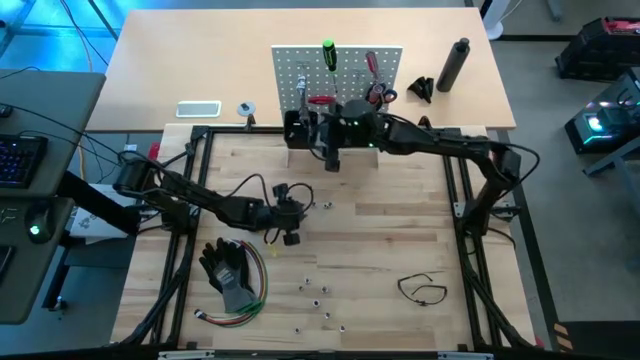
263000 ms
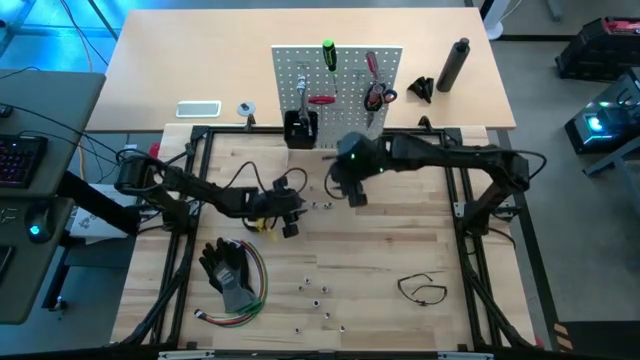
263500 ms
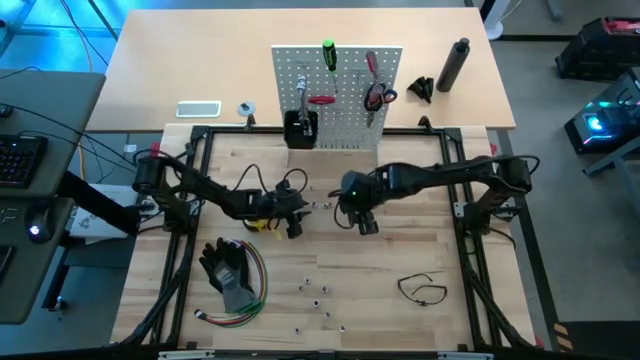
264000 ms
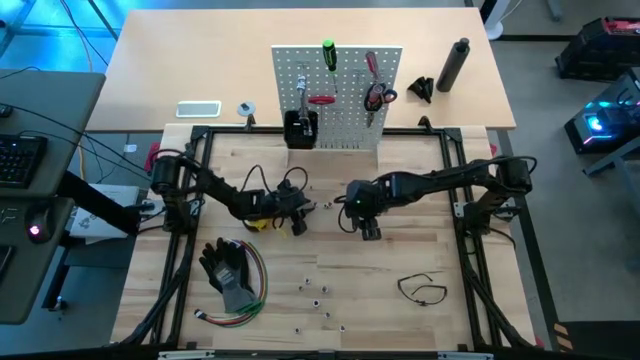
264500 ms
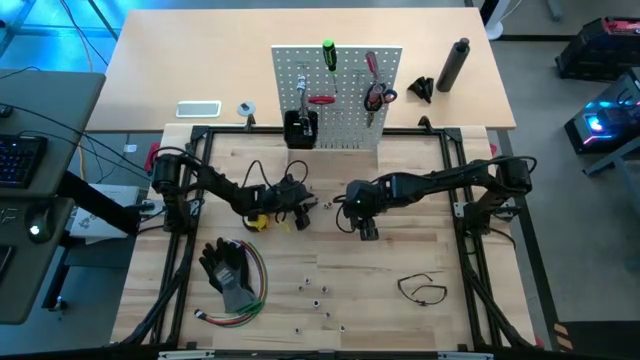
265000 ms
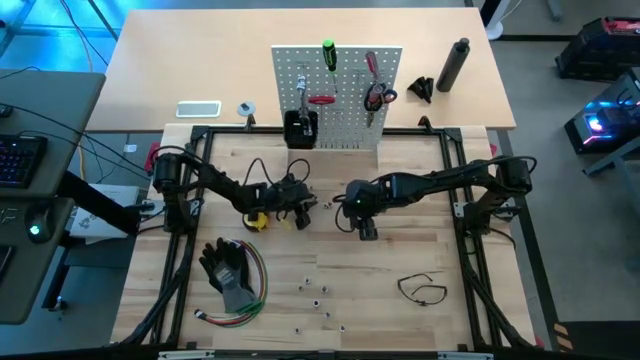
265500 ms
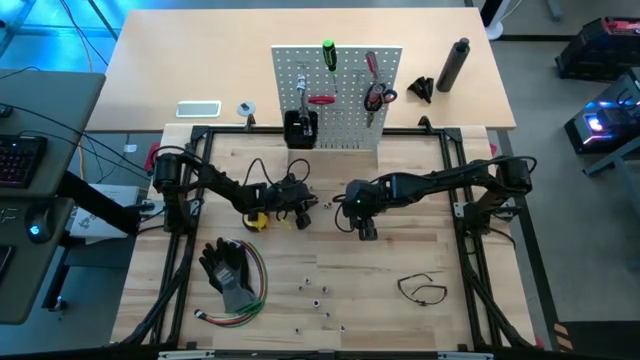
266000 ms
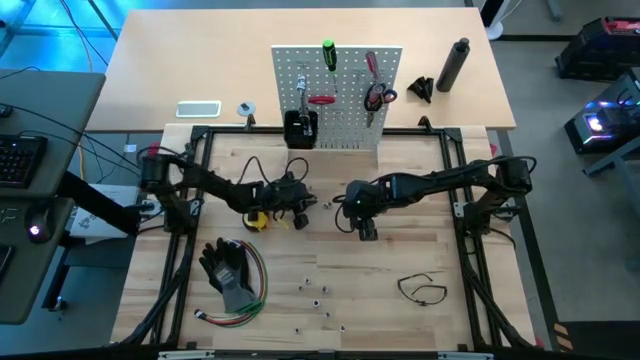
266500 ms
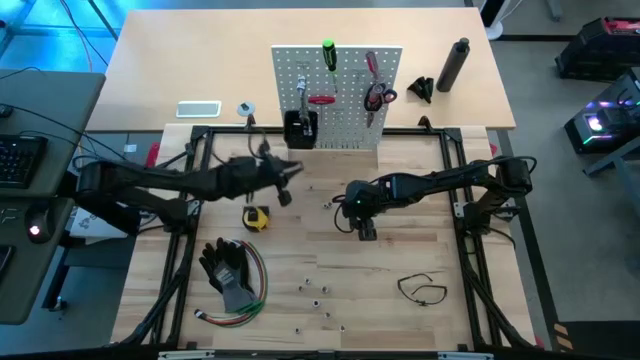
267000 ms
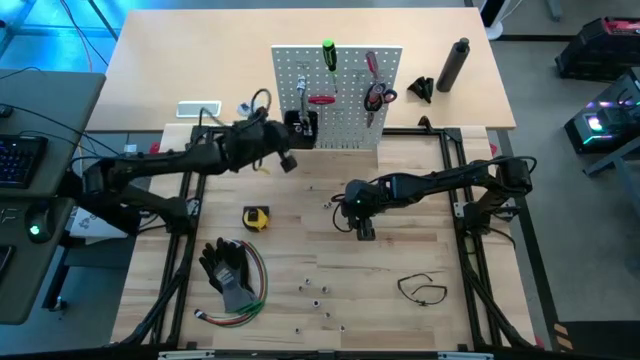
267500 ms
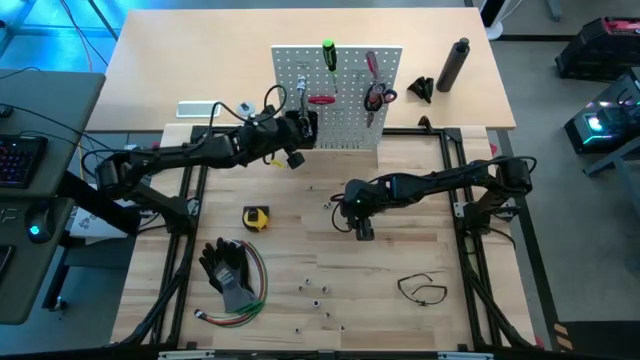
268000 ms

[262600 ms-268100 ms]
Task: Hang tools onto peg board
Put the silver socket into the black bin on the white peg board

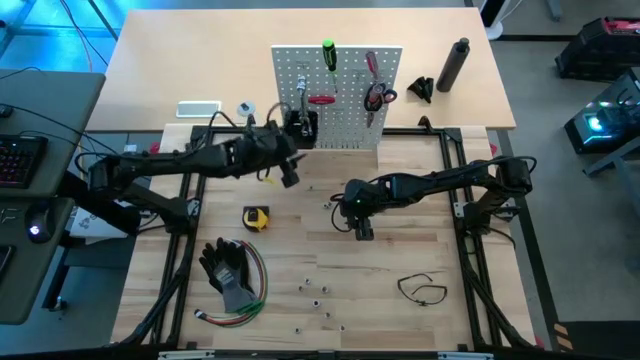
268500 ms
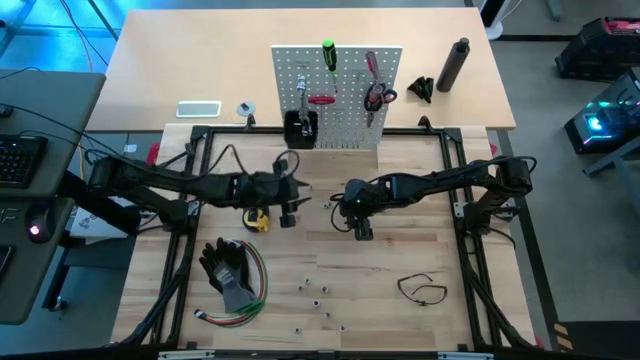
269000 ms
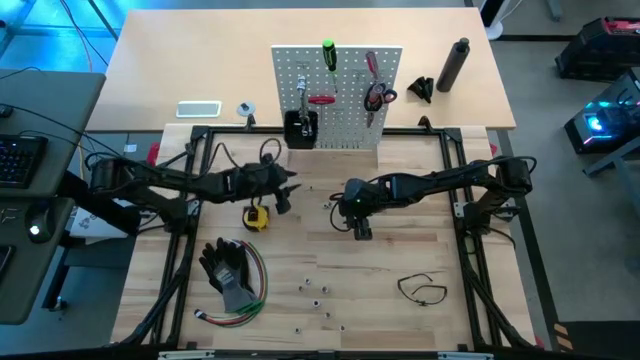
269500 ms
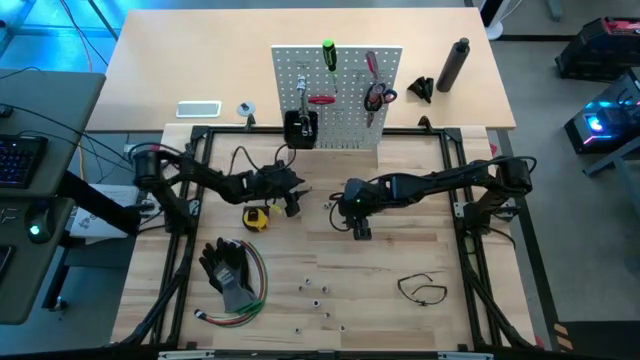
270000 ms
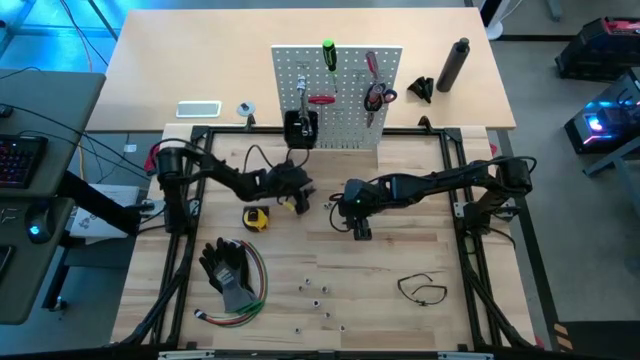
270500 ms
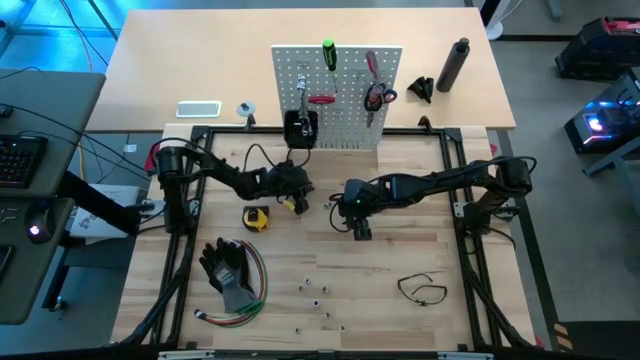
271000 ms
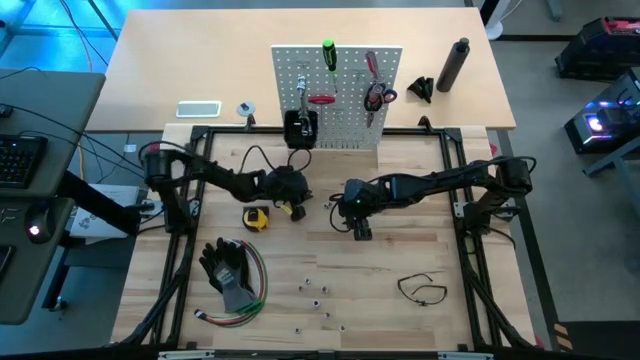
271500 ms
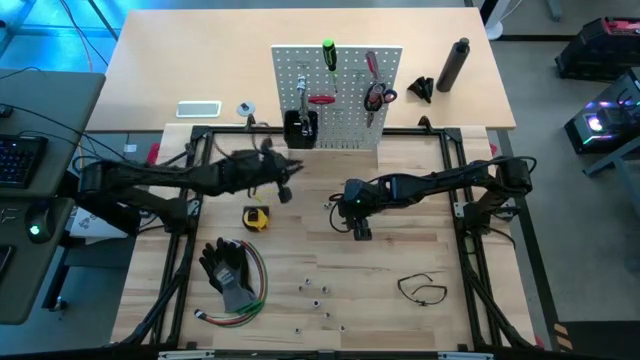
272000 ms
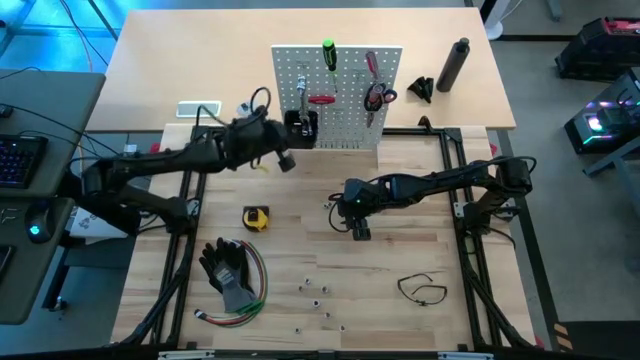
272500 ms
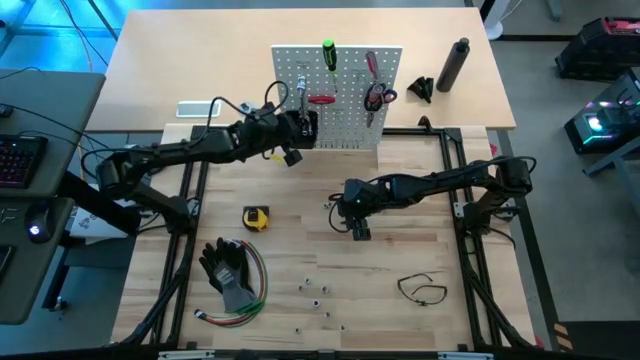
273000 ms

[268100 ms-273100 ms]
Put the silver socket into the black bin on the white peg board

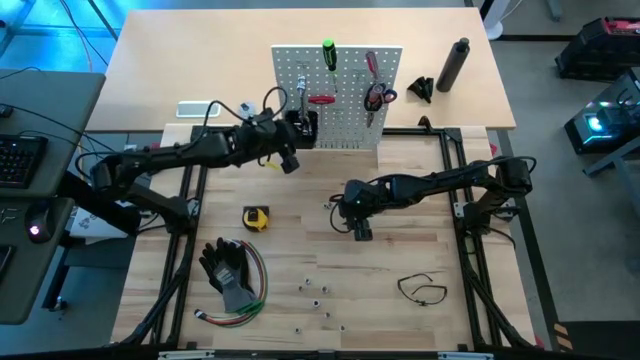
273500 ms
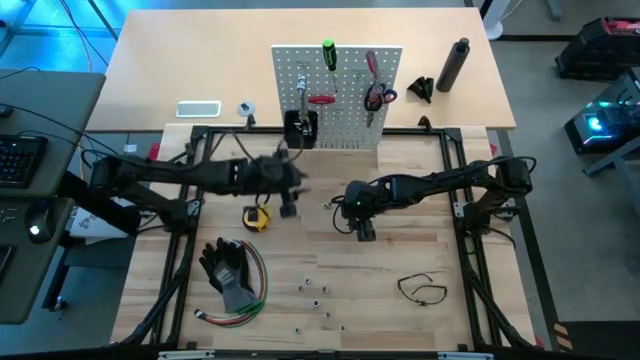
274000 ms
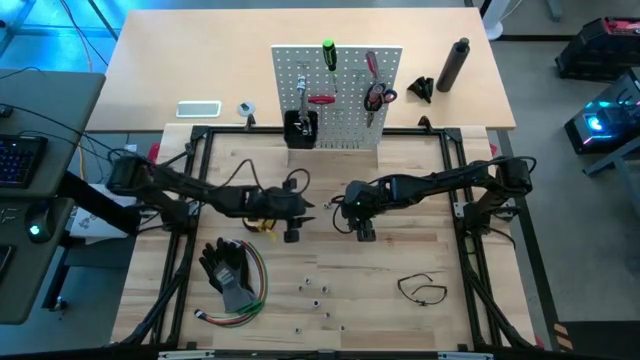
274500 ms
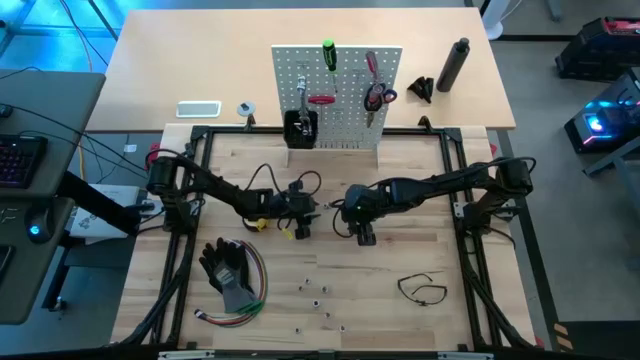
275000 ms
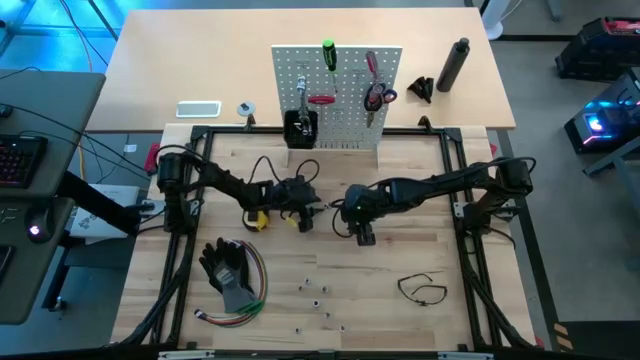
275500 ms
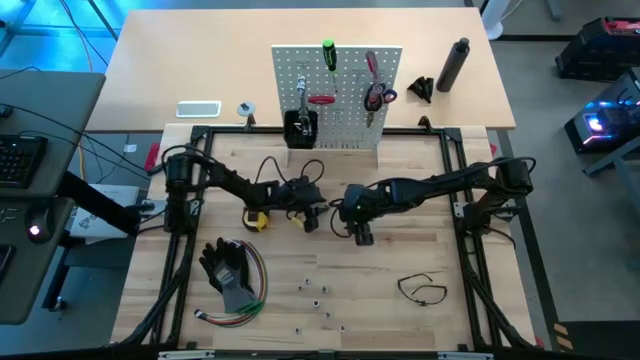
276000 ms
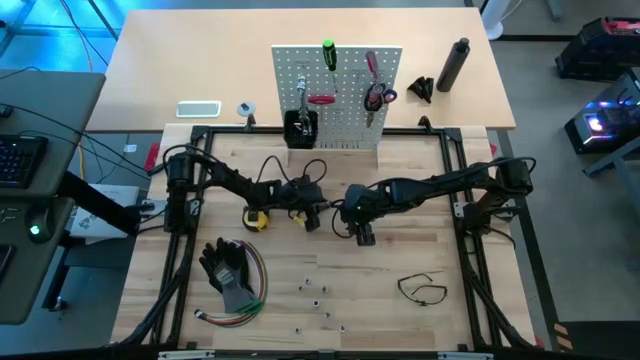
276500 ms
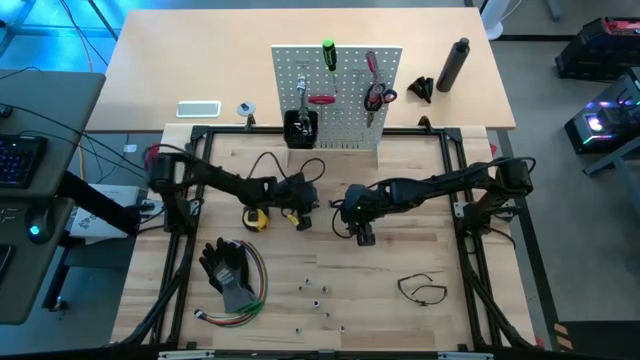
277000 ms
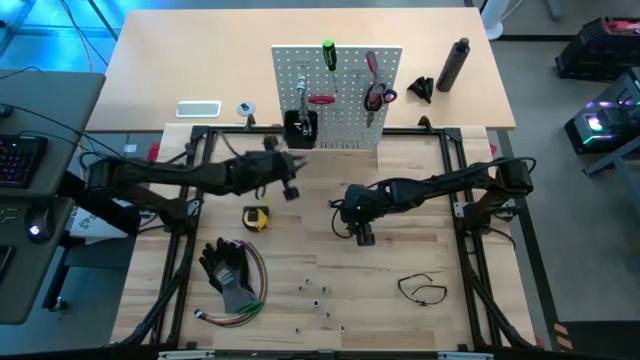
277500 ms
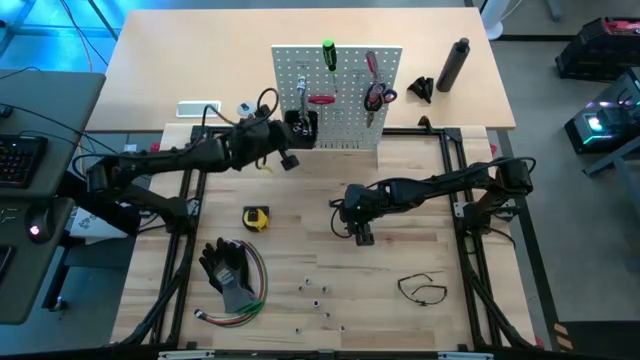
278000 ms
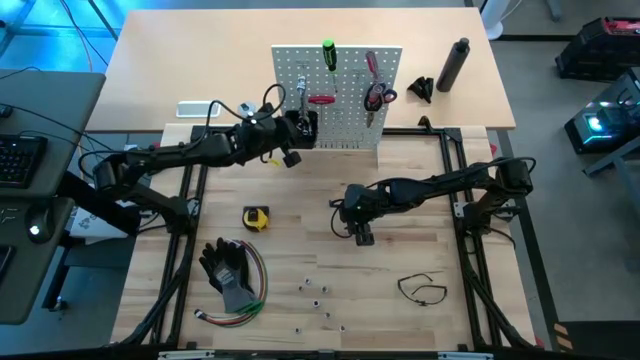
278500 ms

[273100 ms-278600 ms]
Put the silver socket into the black bin on the white peg board

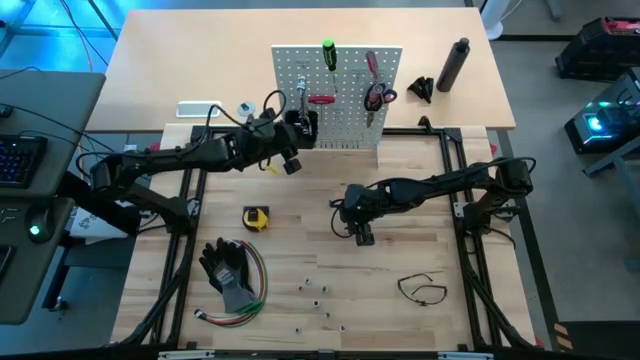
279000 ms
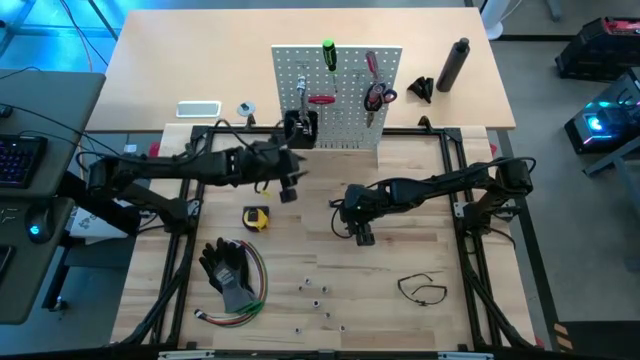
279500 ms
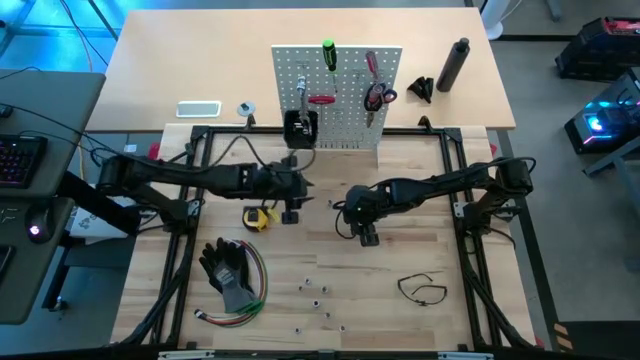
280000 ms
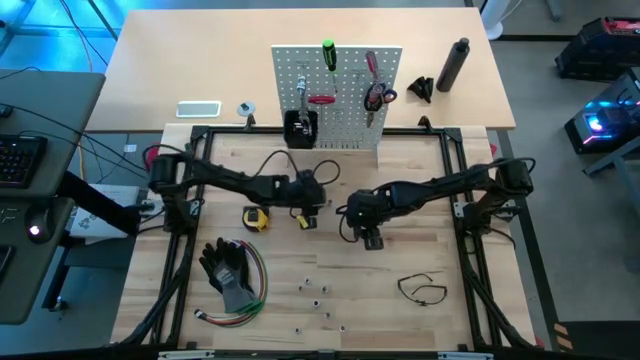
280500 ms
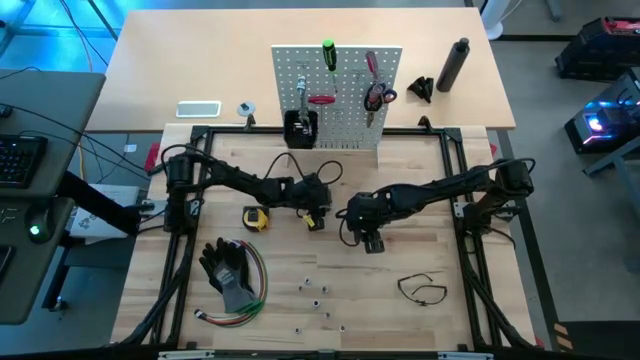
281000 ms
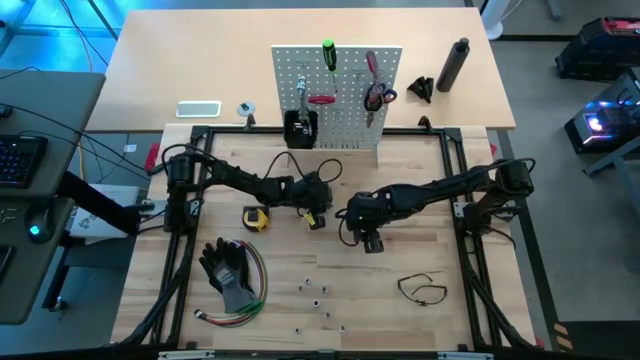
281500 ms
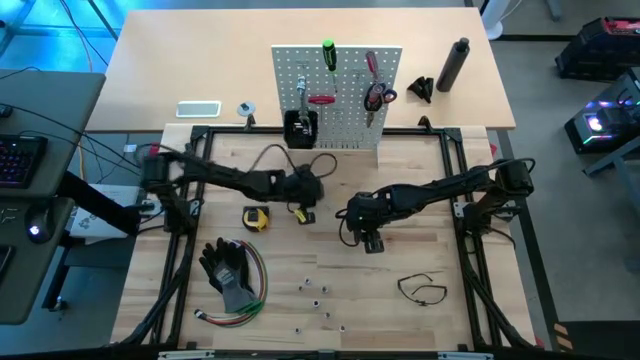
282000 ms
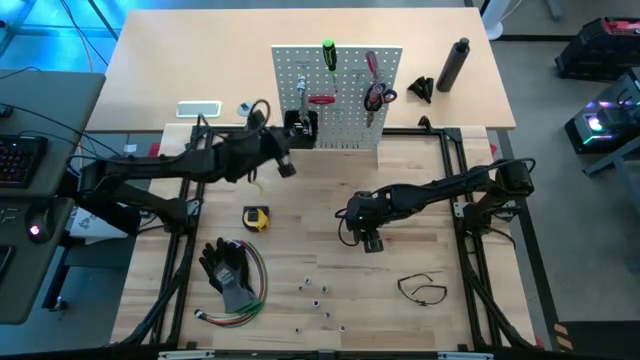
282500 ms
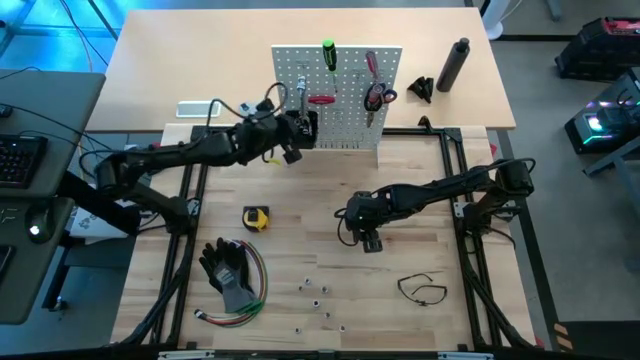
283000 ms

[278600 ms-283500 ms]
Put the silver socket into the black bin on the white peg board
